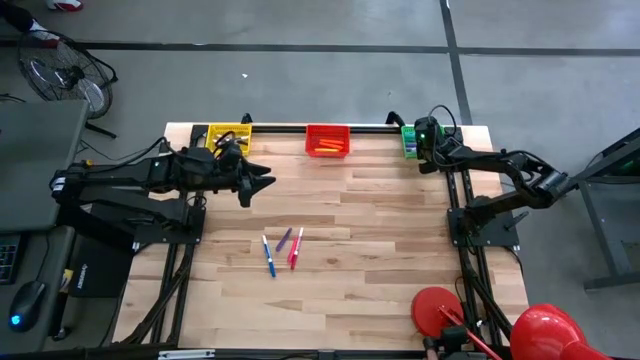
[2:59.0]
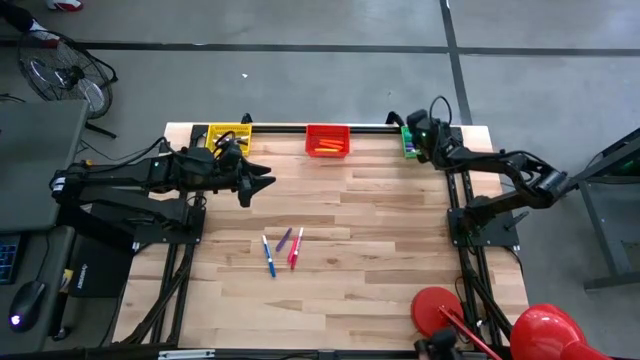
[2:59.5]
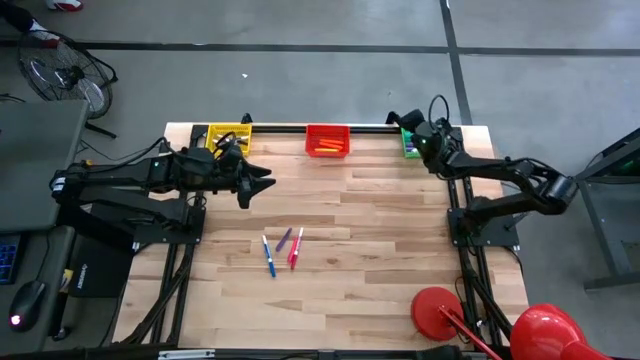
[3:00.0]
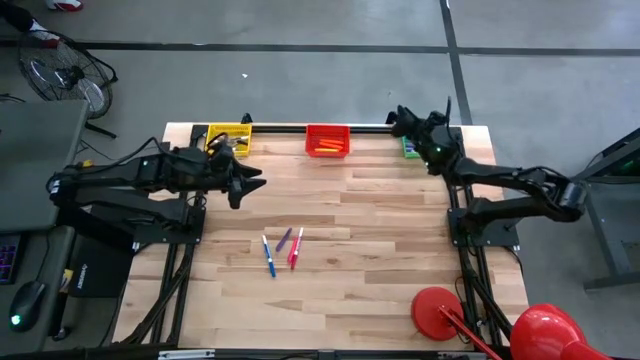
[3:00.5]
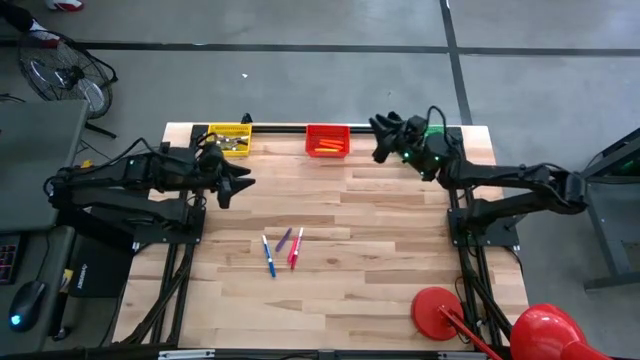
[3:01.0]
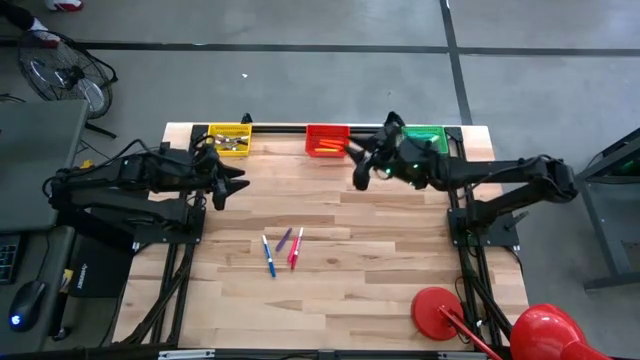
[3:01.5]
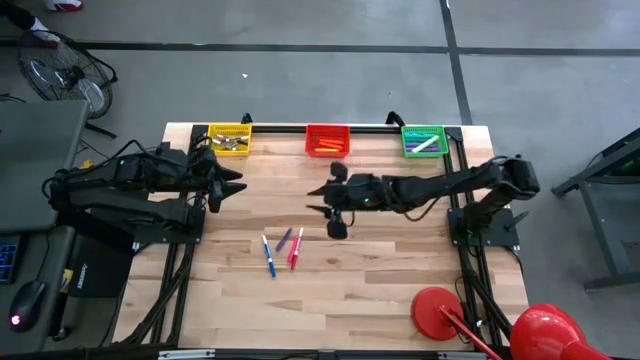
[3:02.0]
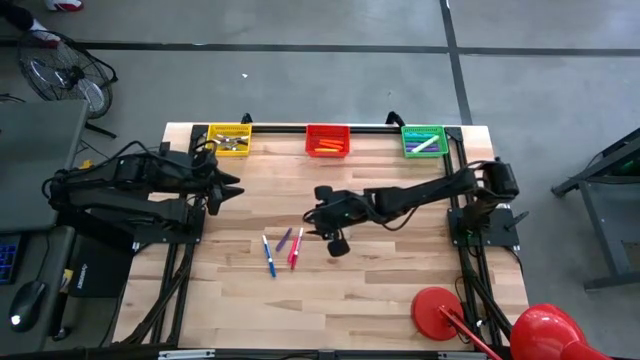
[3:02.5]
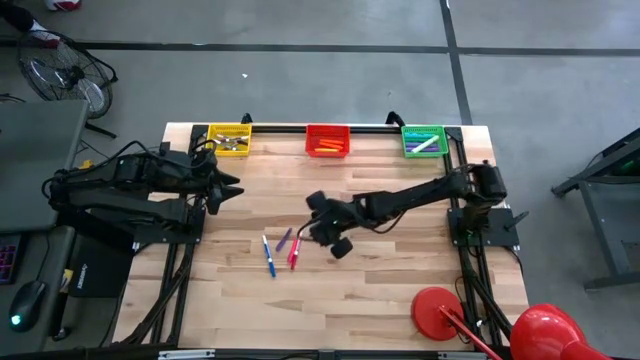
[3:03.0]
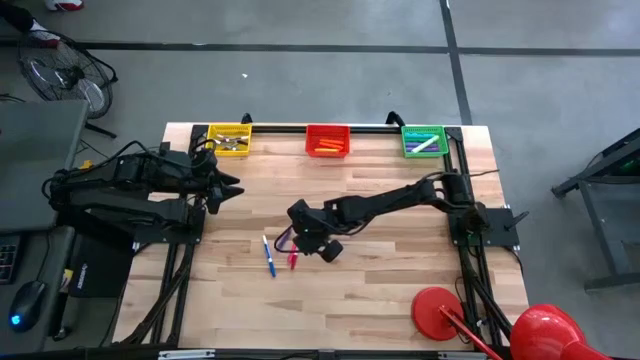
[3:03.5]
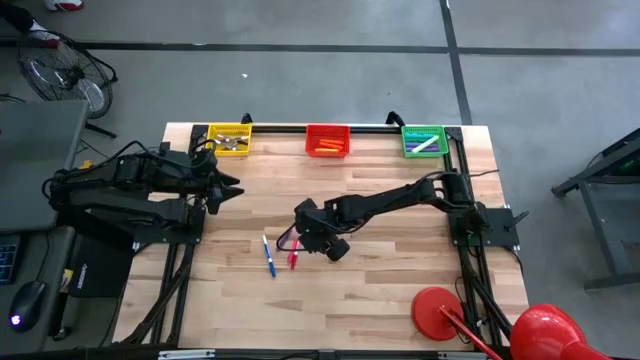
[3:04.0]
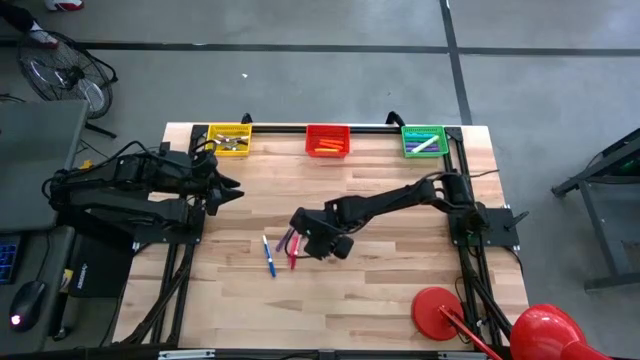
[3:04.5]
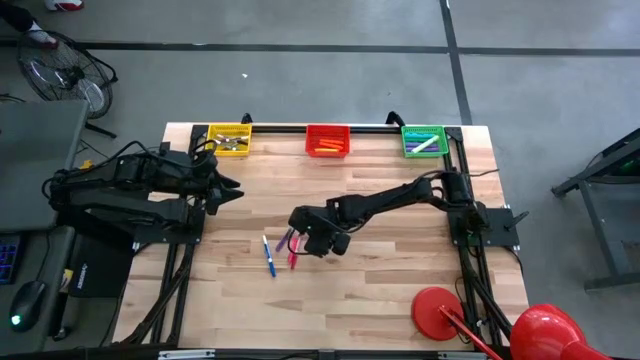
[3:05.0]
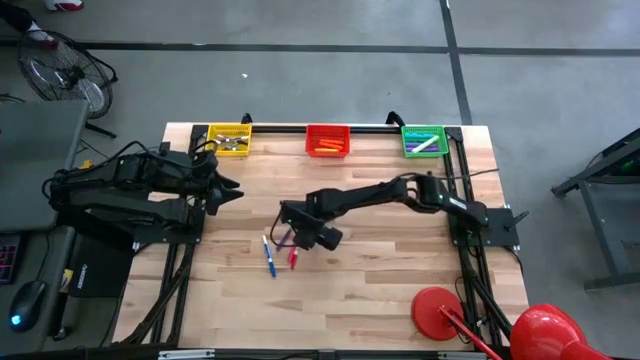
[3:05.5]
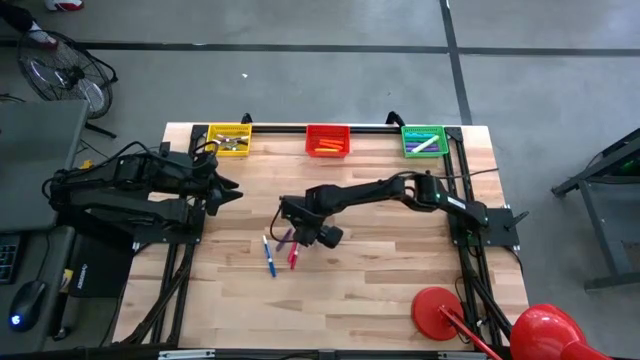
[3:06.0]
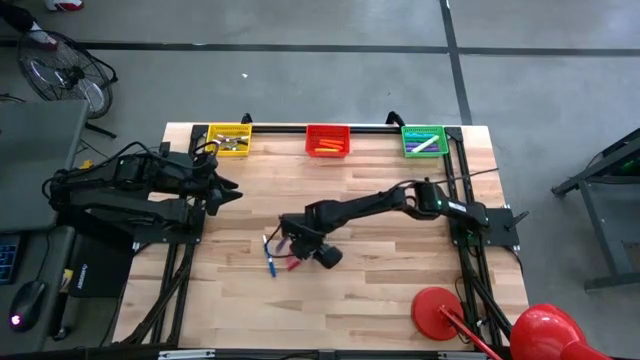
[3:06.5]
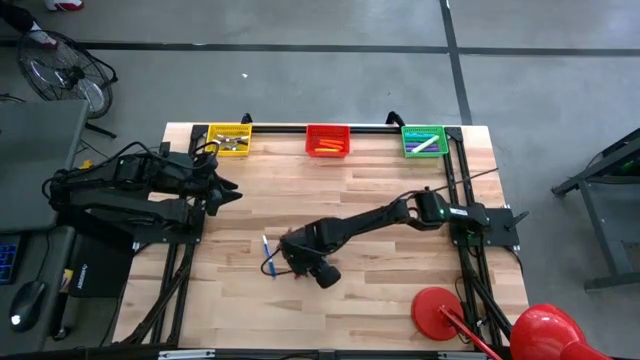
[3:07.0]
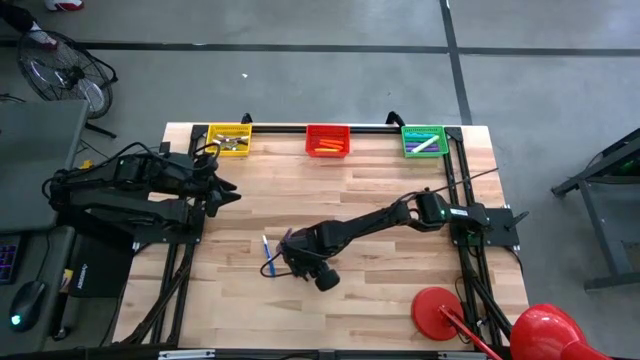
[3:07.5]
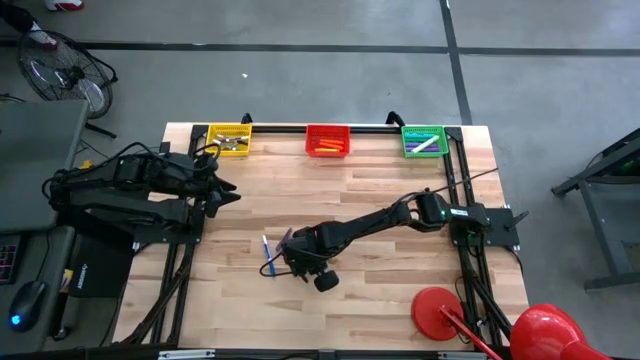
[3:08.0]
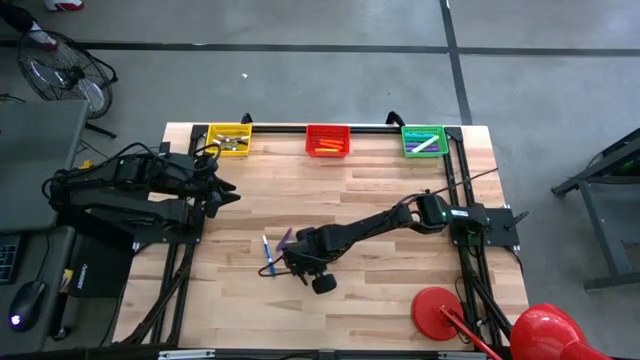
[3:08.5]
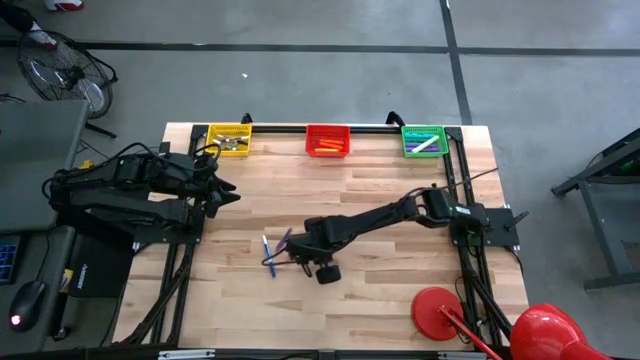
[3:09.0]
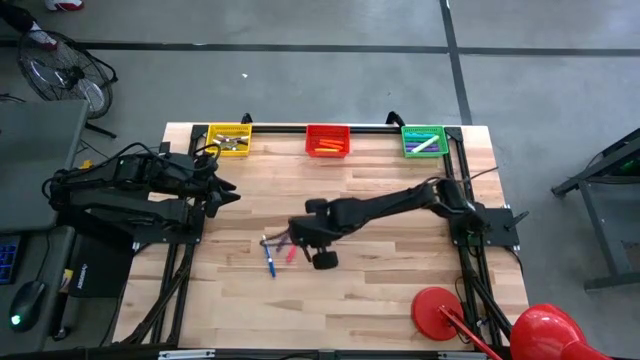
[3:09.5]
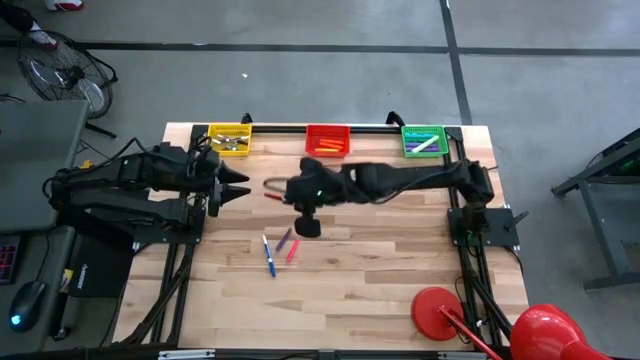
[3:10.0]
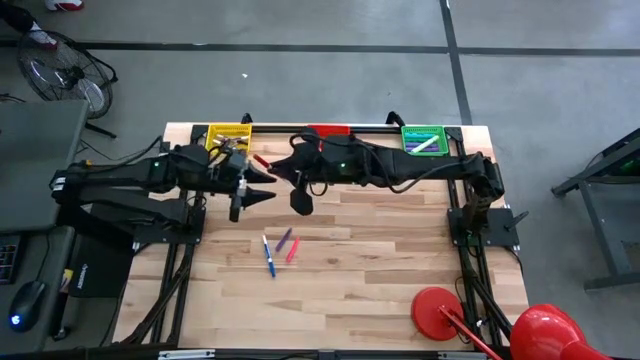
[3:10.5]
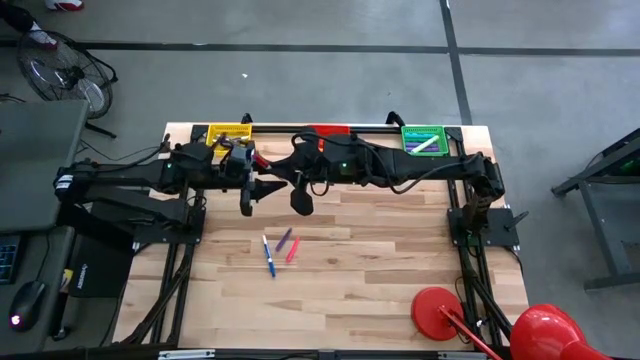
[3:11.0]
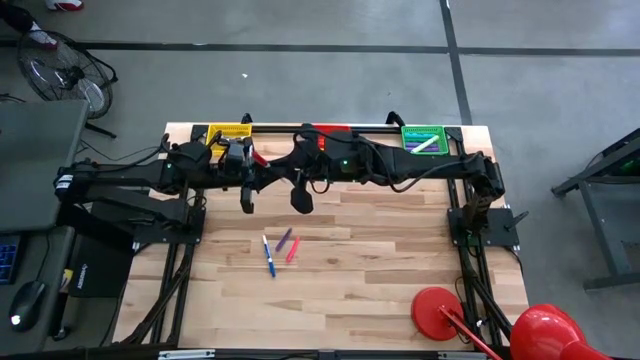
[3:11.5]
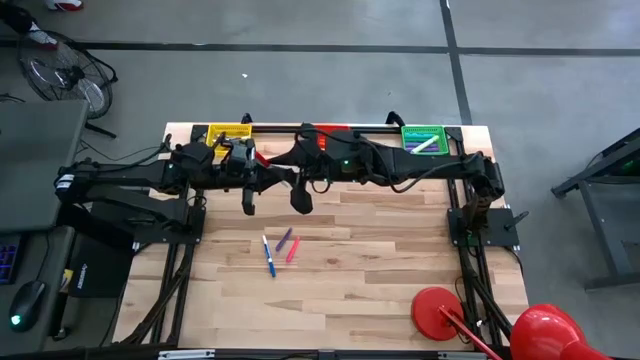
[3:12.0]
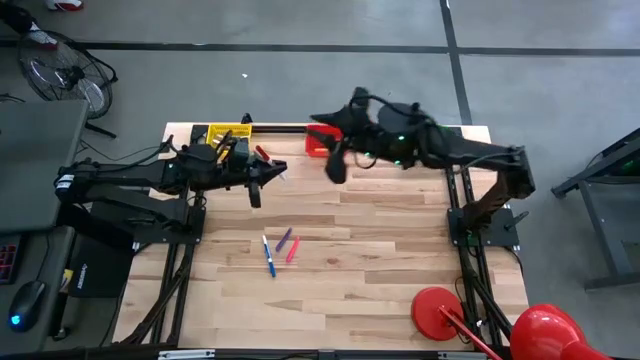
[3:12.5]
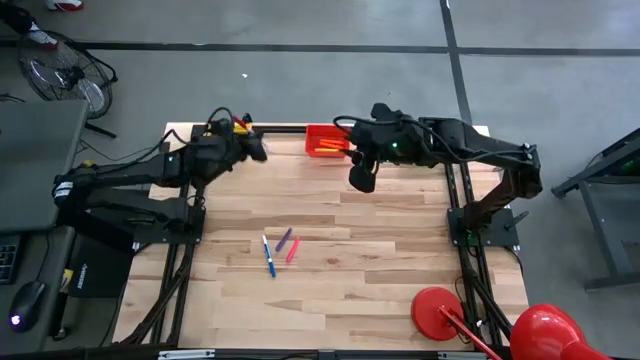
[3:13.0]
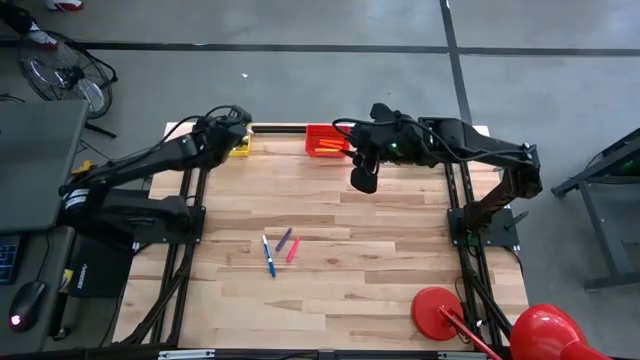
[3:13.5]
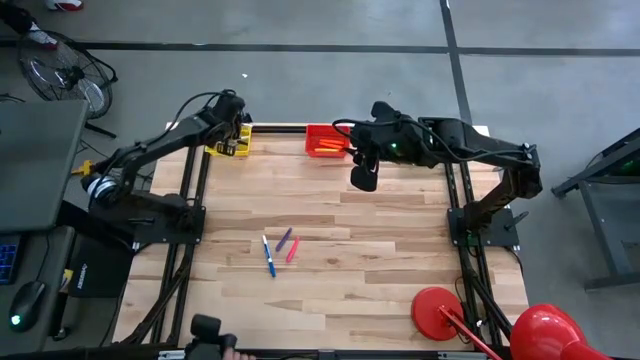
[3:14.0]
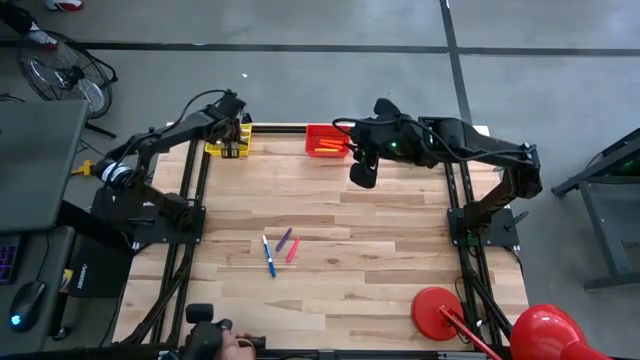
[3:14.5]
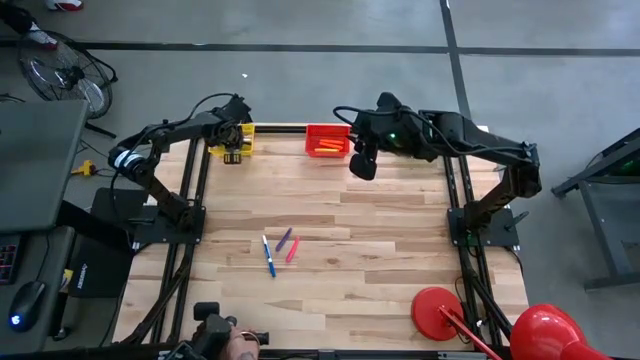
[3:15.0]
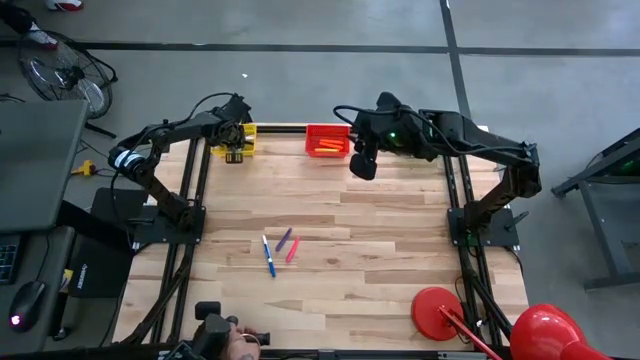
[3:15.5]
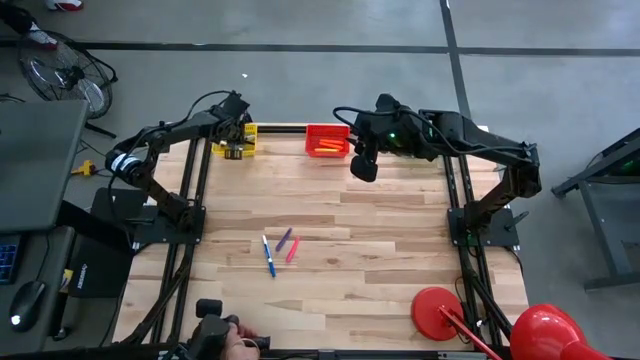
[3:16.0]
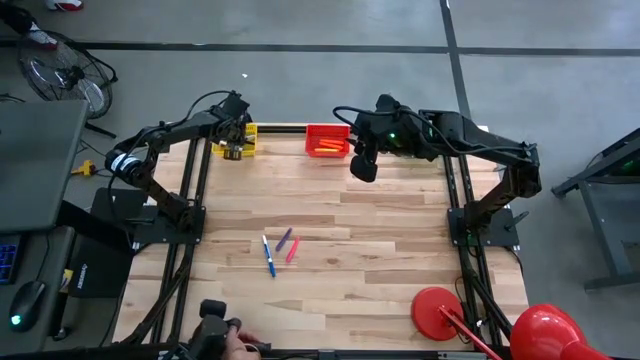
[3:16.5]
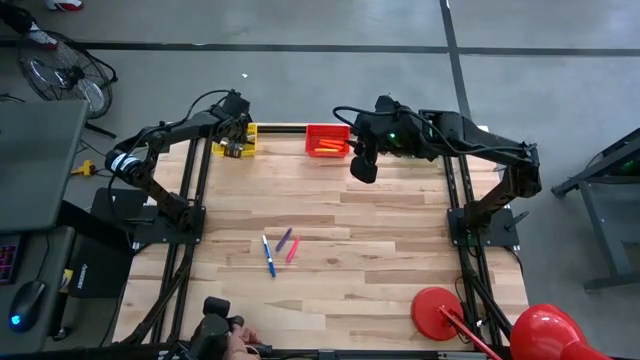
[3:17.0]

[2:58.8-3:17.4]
Task: Pick & Place Markers
Put the red marker into the yellow bin

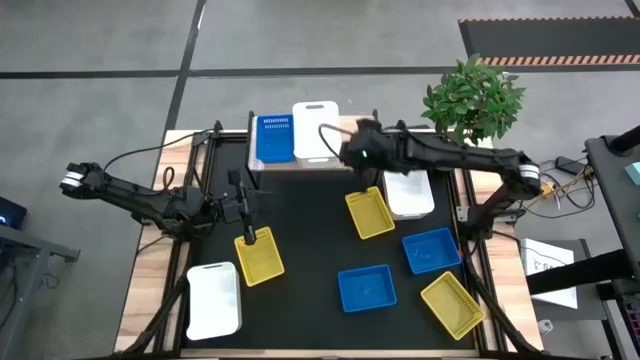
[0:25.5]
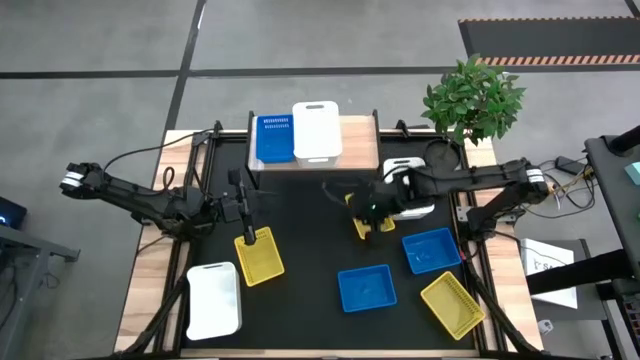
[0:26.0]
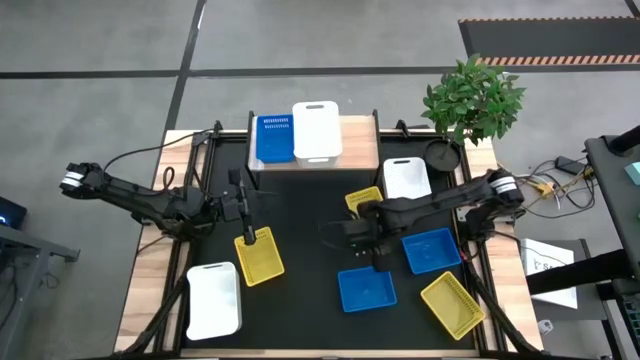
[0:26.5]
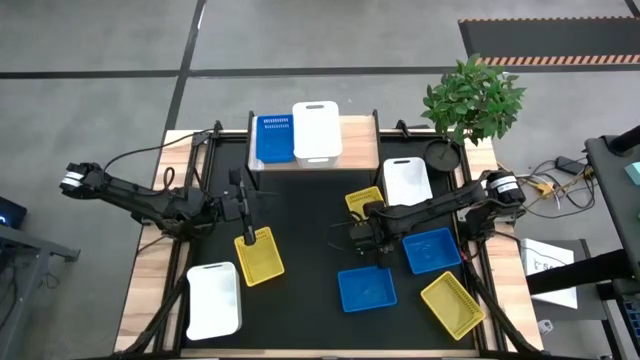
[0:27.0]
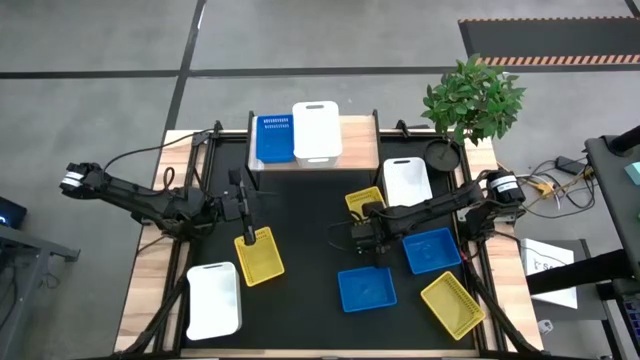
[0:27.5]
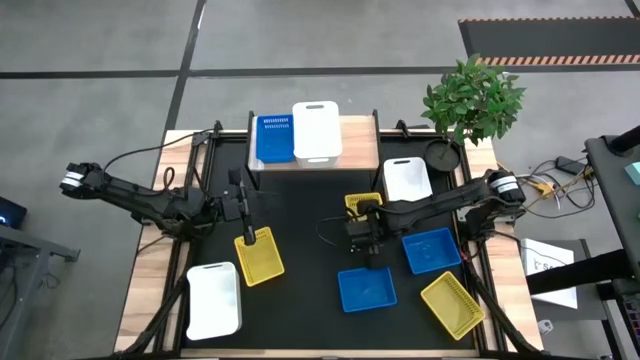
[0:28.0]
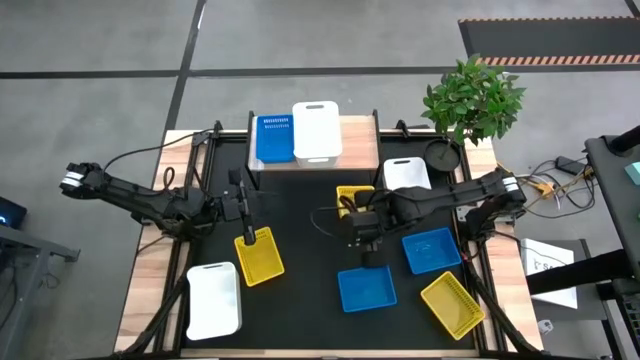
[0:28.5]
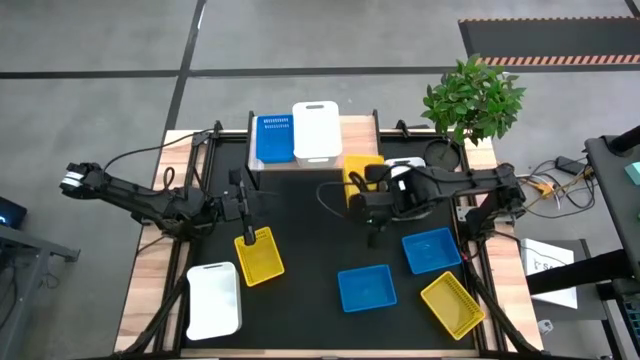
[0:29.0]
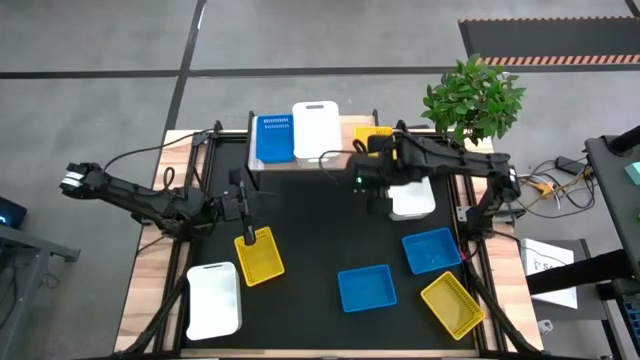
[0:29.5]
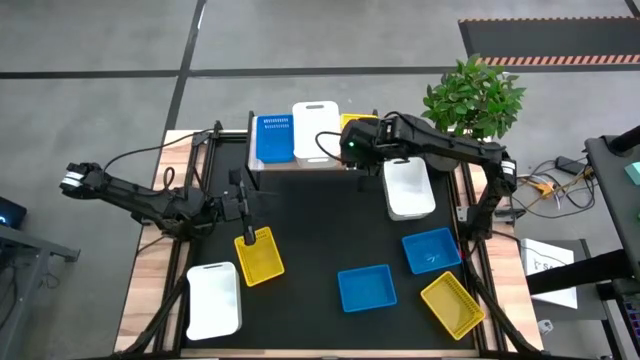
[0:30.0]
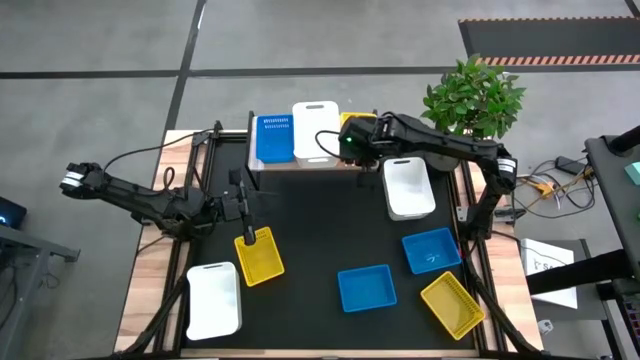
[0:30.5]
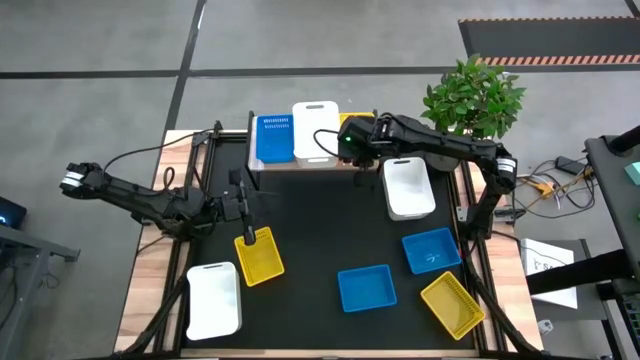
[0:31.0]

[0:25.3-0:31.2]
Task: Stack baskets on shelf by color
Put the top yellow bin on the shelf
